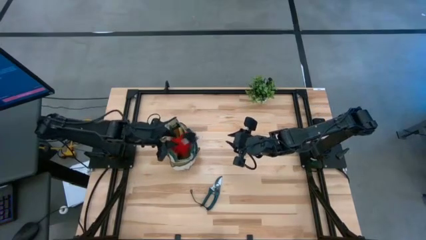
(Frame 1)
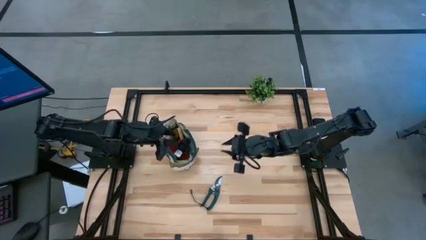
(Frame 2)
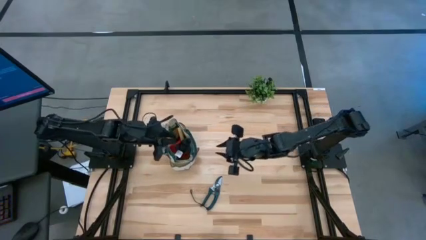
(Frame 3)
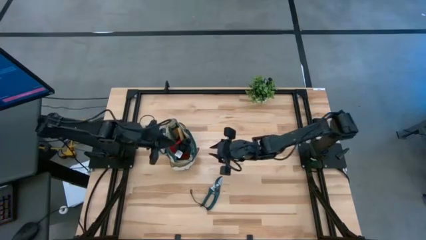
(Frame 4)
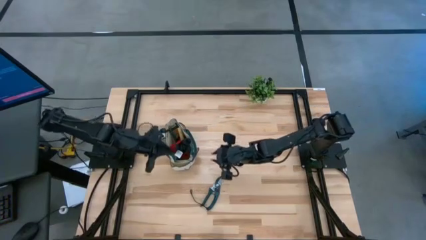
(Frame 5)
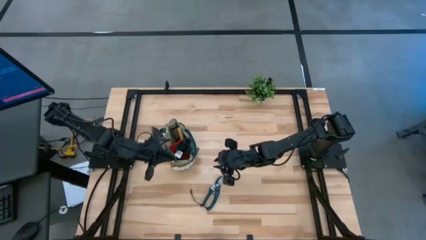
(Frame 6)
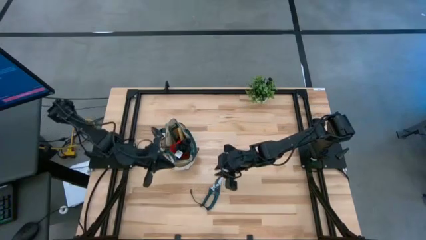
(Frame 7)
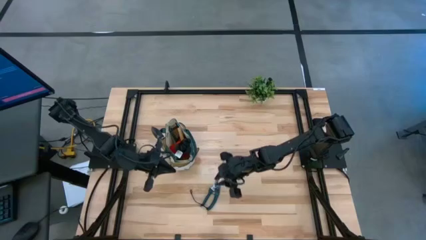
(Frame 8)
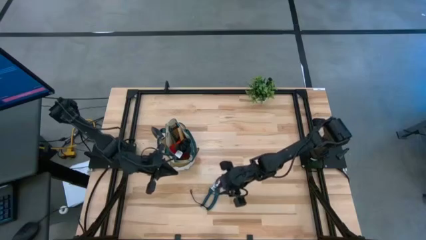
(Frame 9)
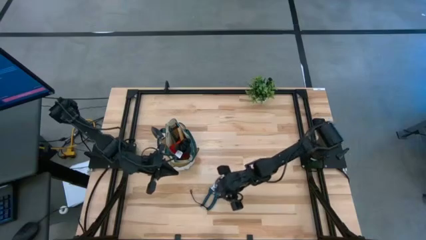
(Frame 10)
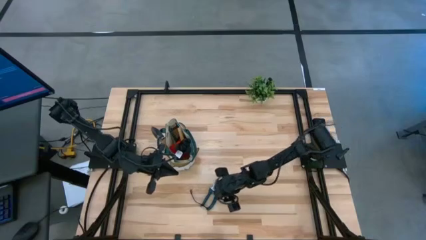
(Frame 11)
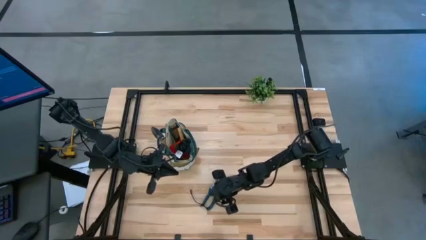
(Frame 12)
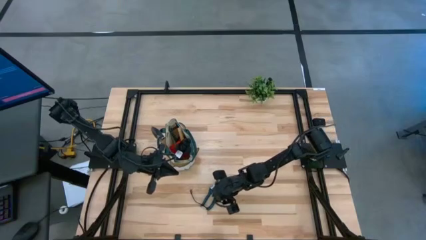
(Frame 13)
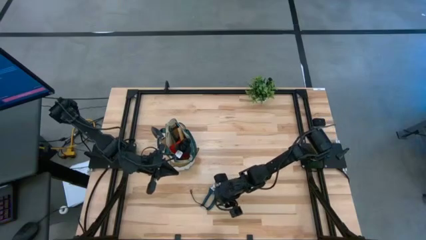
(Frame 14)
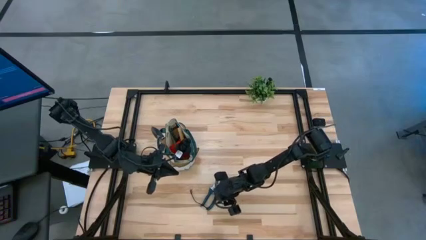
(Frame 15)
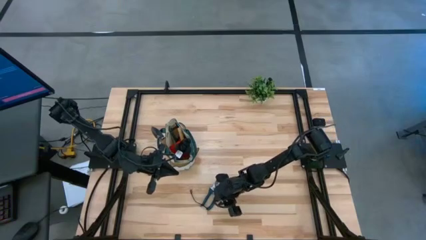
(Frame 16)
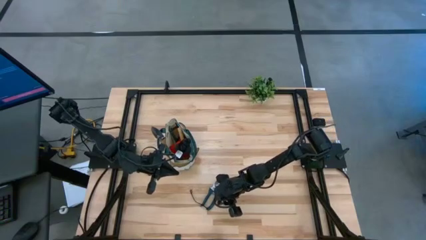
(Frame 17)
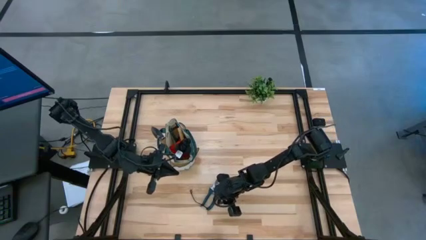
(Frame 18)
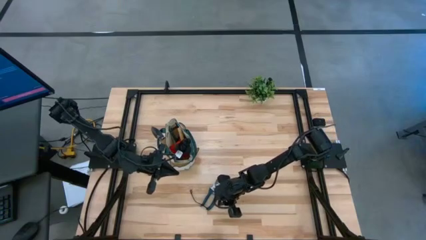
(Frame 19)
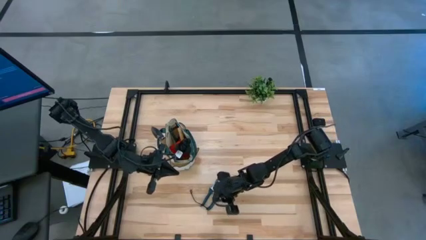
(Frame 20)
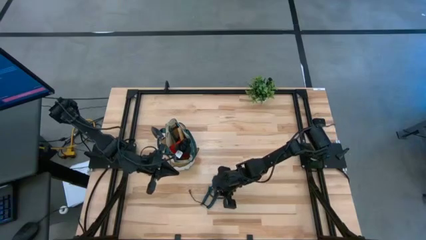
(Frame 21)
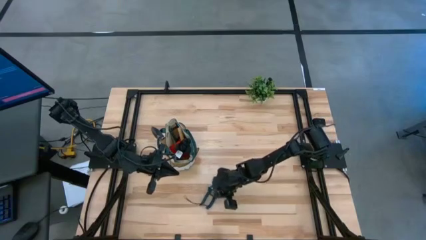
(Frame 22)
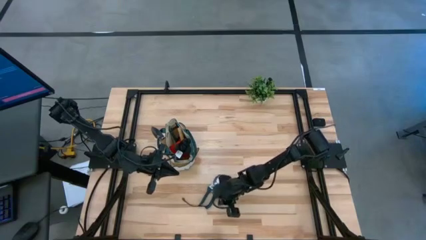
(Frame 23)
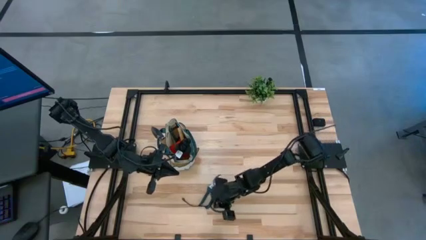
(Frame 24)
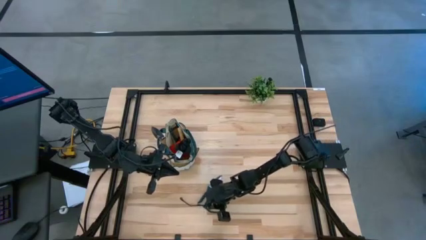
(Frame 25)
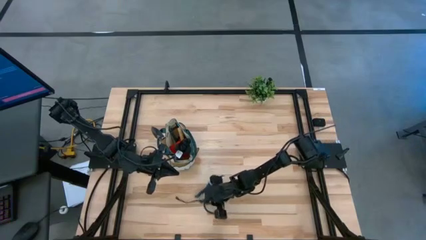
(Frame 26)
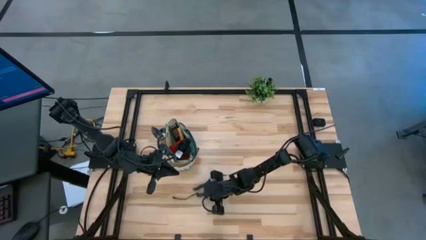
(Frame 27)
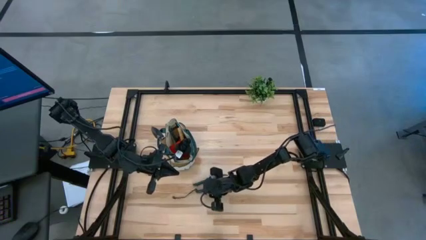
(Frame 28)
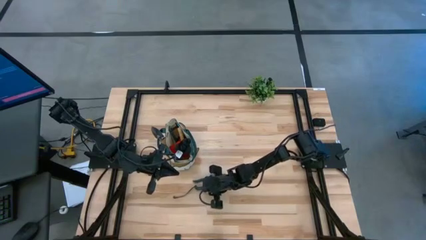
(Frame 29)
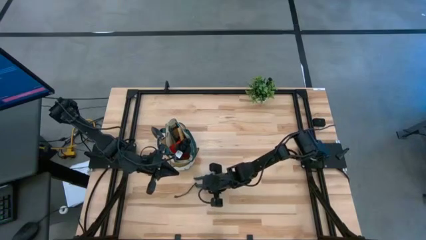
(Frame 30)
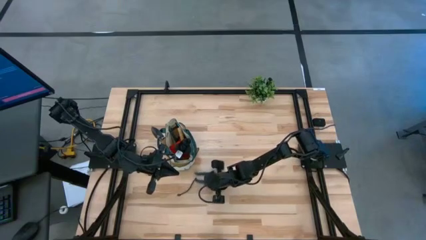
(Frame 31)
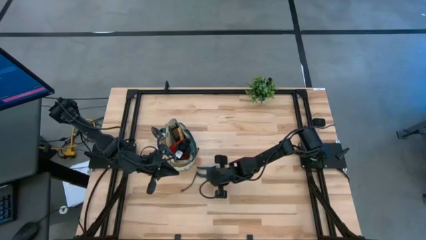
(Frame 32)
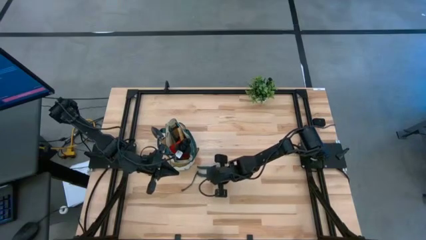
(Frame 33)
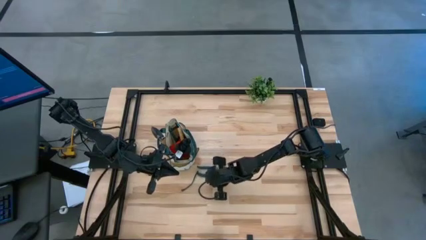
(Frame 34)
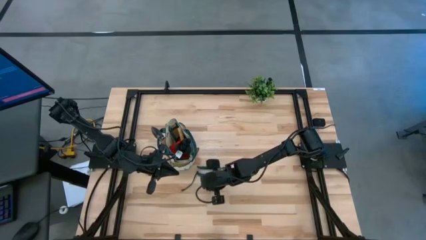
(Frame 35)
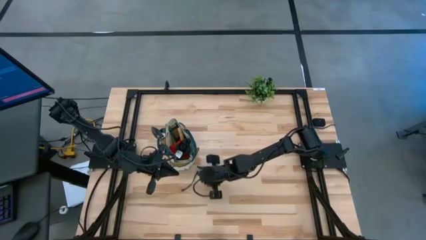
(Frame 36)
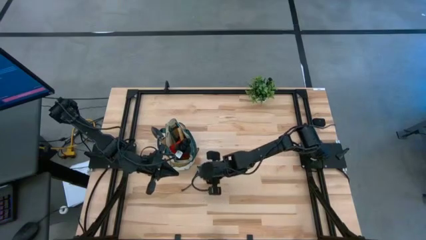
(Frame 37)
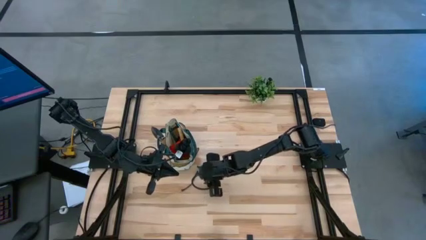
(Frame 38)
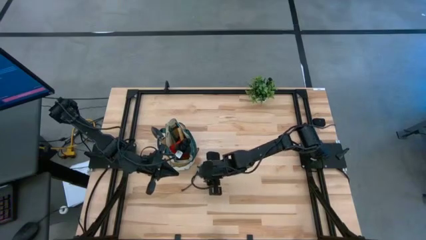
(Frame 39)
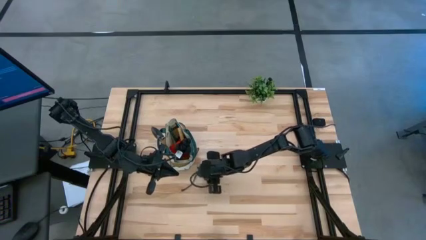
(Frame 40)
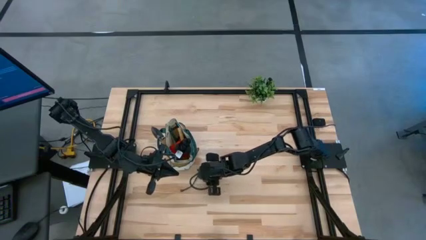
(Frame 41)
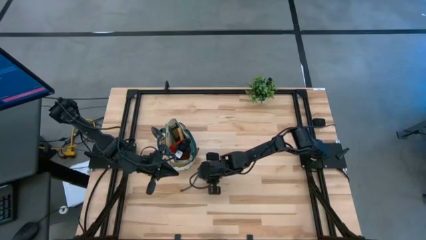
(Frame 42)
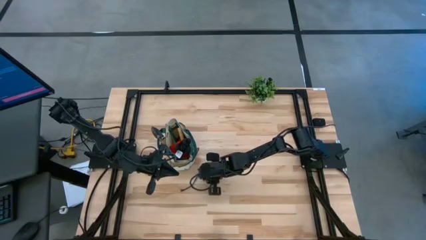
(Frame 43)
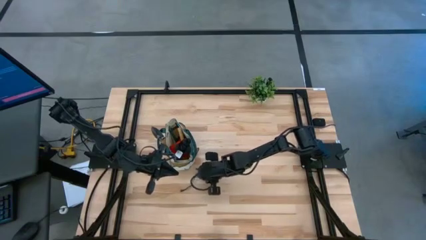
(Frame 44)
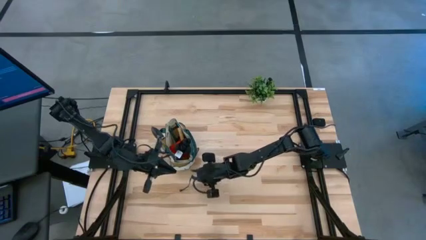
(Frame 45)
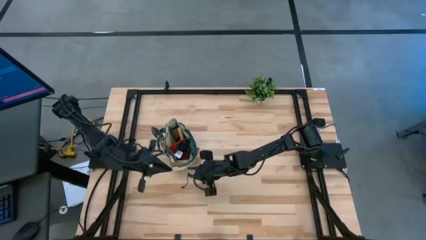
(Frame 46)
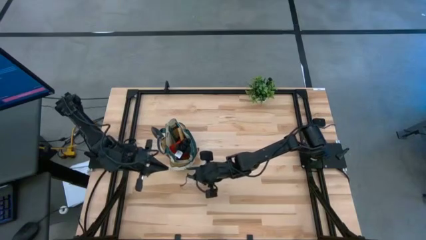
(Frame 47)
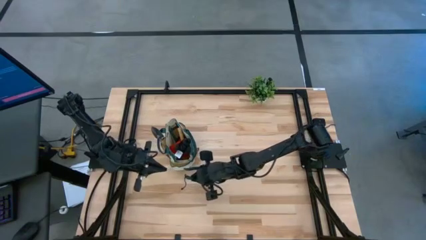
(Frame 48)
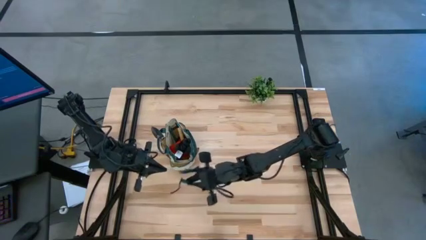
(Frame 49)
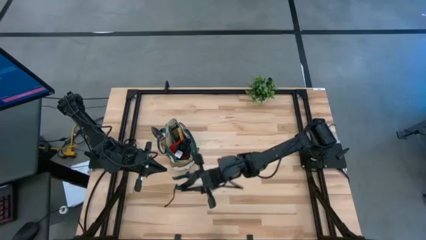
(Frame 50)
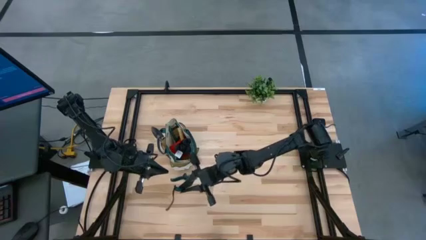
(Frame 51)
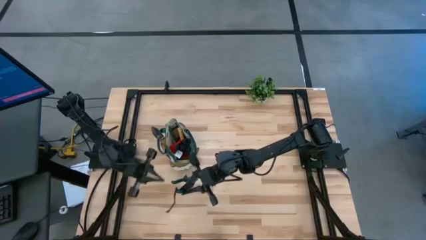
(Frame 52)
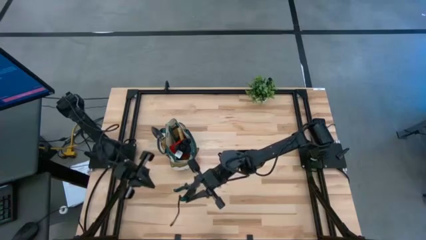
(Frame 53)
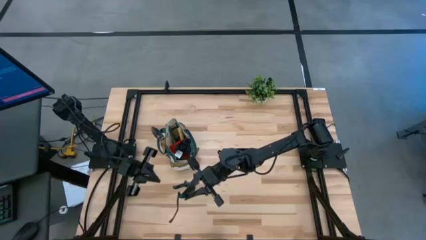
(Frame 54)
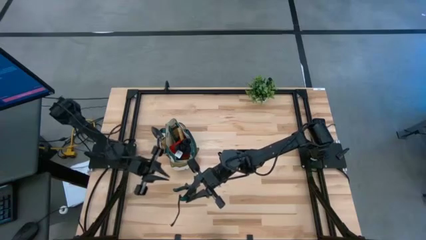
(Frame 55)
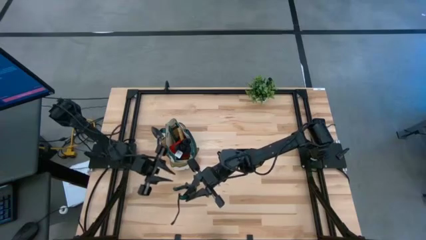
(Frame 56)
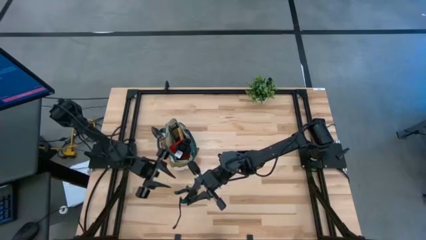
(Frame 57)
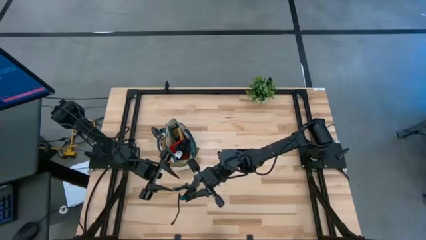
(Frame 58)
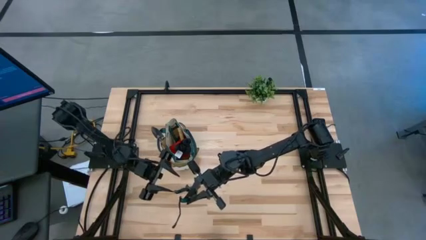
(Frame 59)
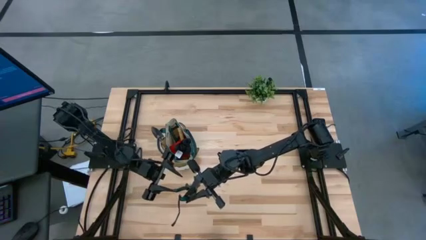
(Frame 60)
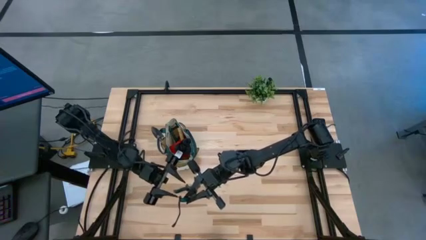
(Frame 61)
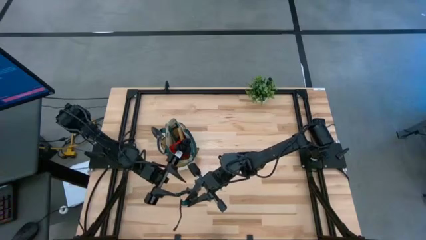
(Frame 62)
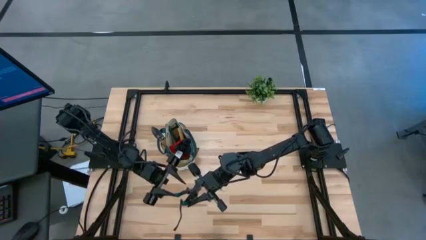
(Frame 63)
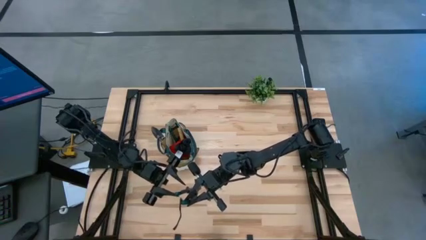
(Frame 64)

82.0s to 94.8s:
Task: Pick & Place Garden tools in Gardening bag
Put the green shear scissors into the green gardening bag

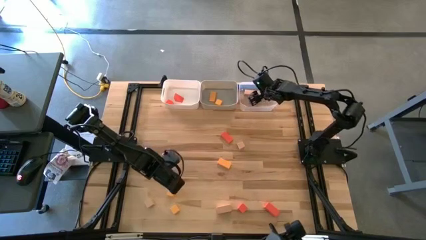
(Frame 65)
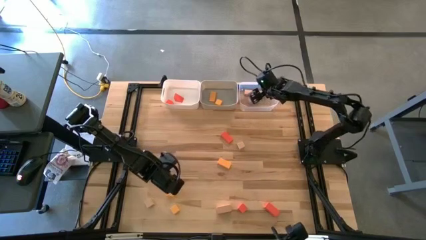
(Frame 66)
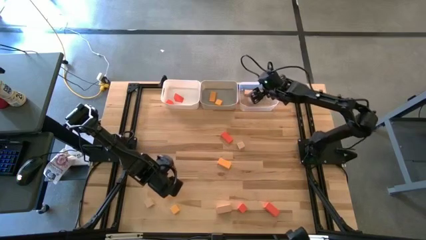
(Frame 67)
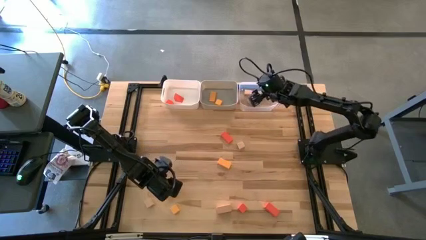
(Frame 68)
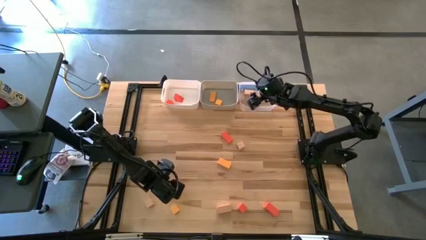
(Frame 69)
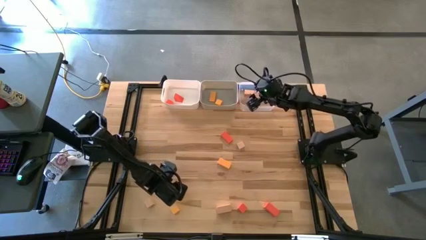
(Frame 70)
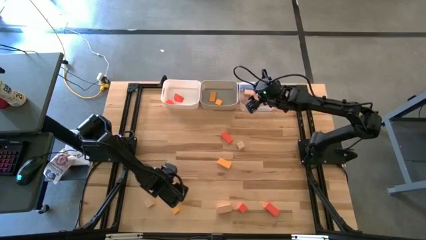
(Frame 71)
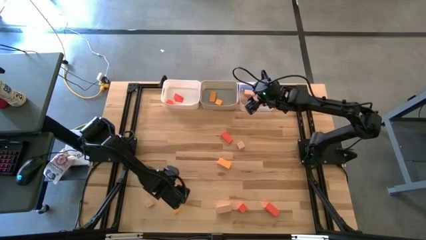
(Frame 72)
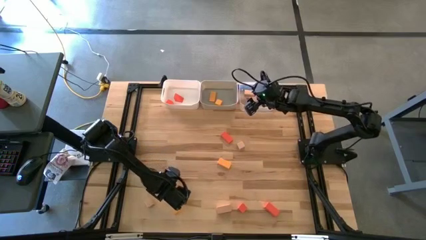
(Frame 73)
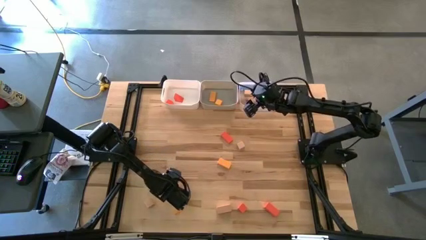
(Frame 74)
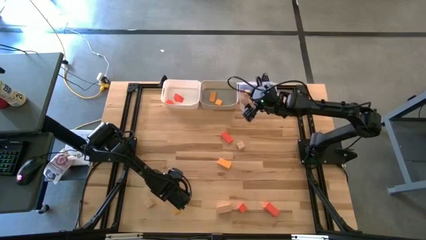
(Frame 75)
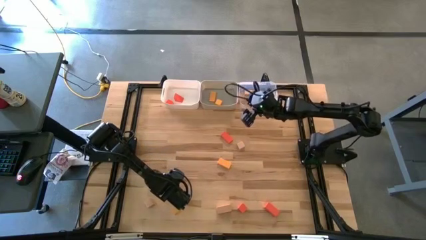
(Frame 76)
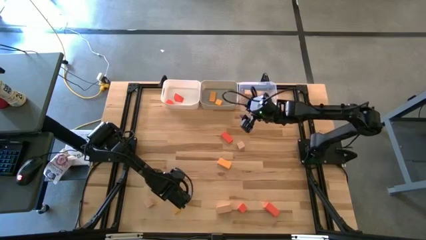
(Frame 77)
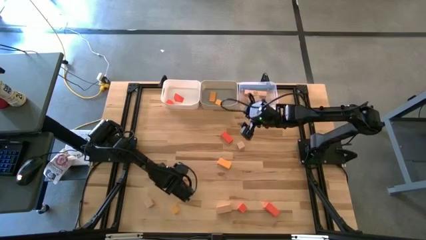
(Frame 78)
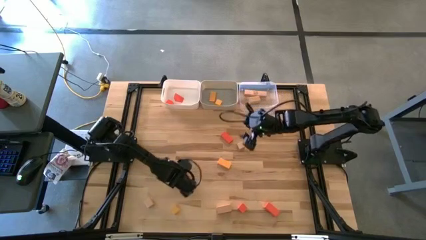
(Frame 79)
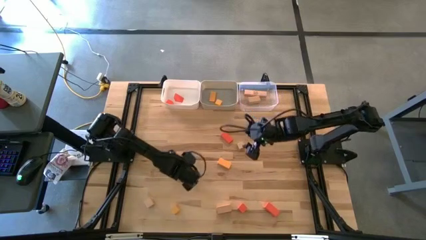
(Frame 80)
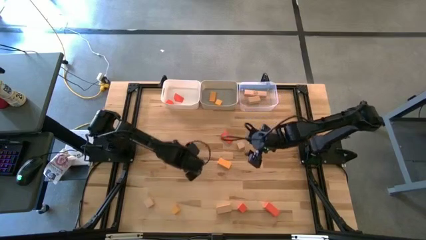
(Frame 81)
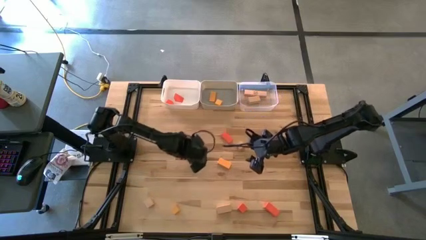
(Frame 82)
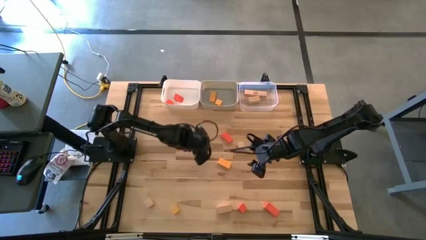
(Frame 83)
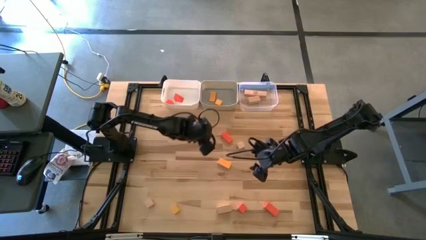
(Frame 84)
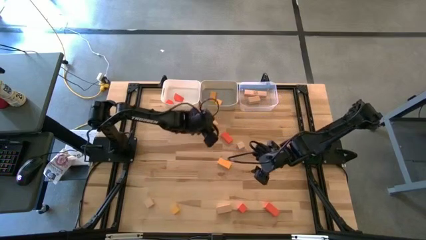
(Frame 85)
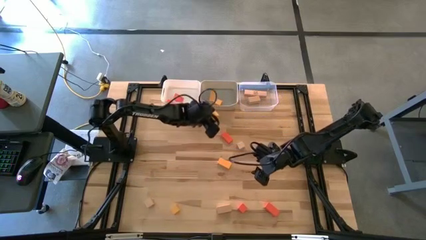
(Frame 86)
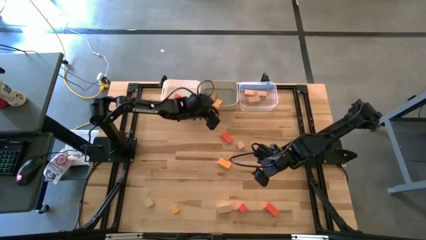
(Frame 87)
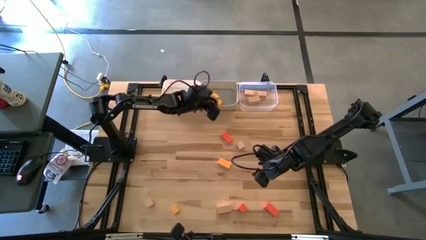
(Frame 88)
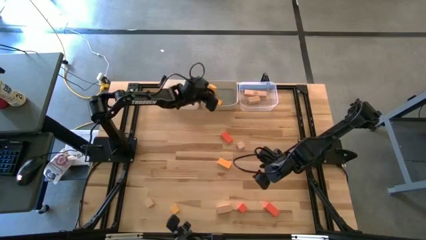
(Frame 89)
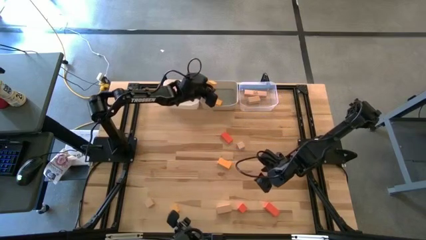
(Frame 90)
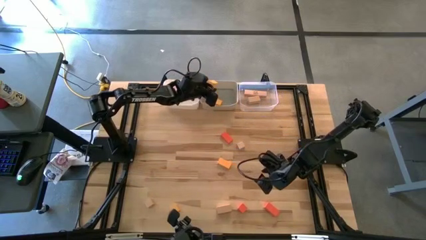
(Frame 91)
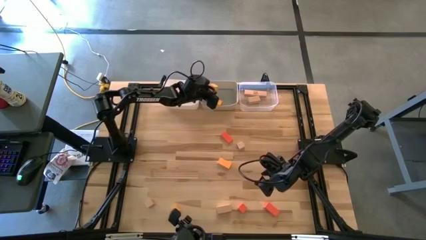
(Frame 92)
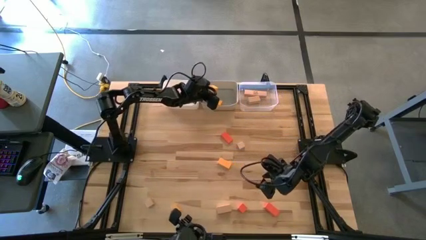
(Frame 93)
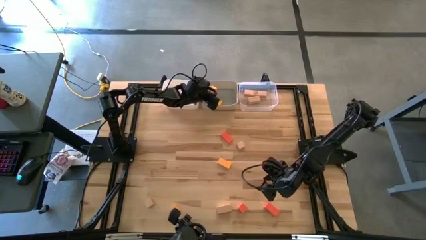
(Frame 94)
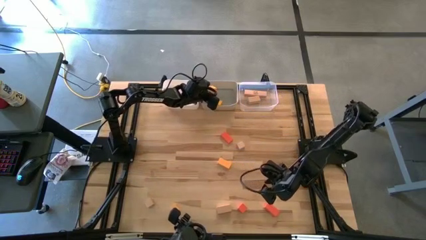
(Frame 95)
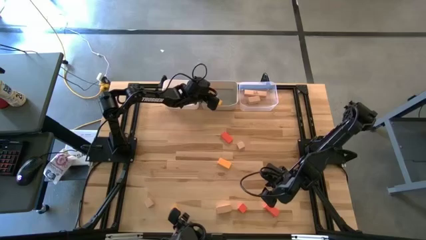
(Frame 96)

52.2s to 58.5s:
Task: Sort & place blocks by color
Put the yellow block into the gray bin
